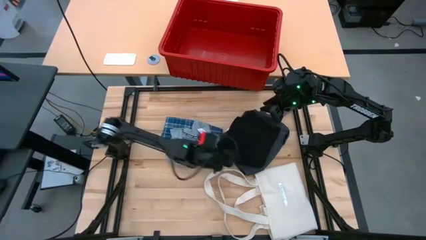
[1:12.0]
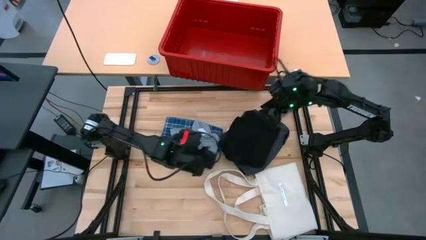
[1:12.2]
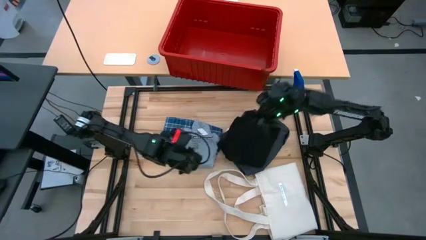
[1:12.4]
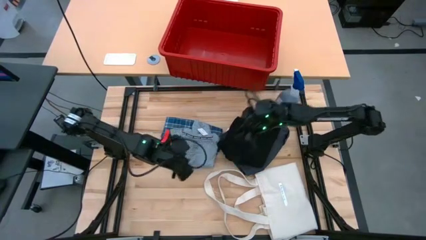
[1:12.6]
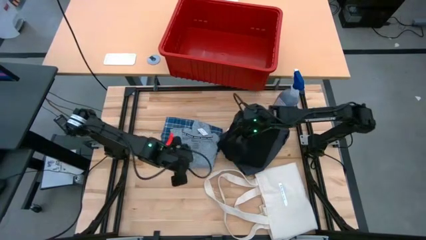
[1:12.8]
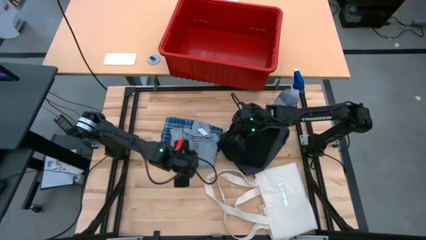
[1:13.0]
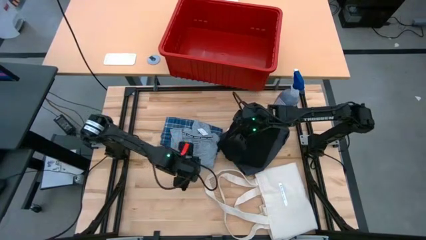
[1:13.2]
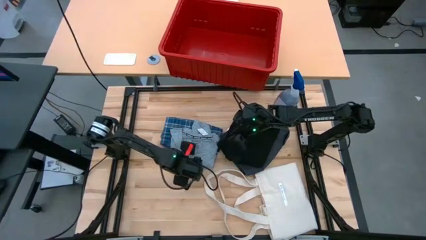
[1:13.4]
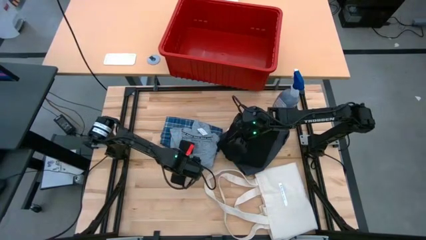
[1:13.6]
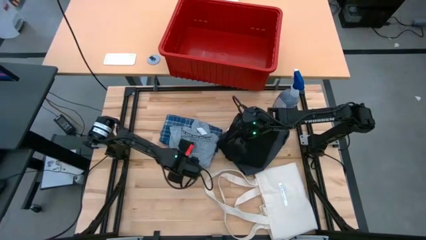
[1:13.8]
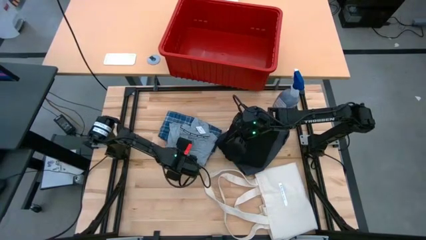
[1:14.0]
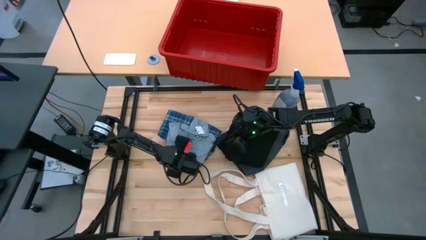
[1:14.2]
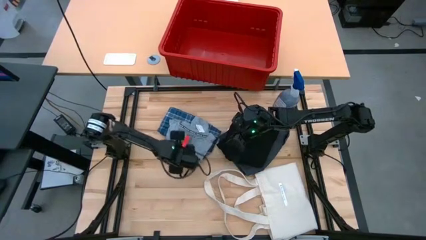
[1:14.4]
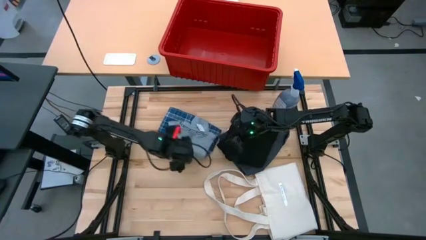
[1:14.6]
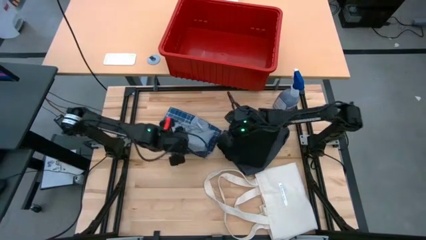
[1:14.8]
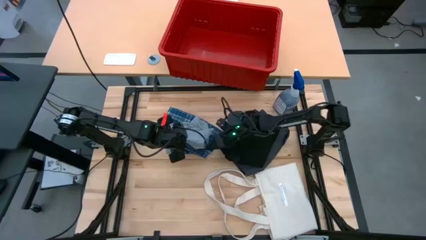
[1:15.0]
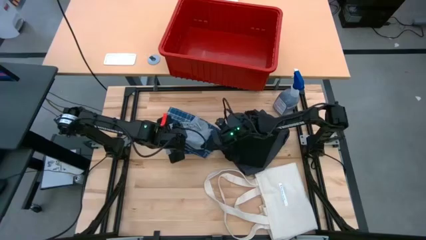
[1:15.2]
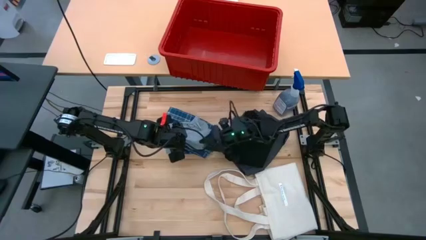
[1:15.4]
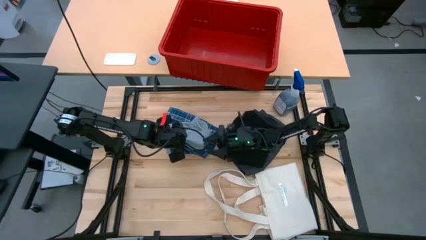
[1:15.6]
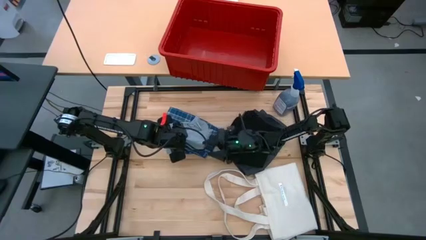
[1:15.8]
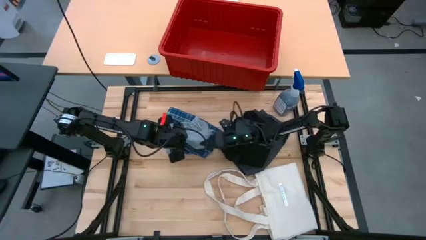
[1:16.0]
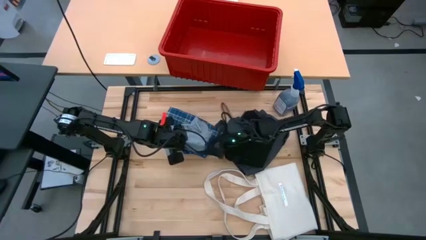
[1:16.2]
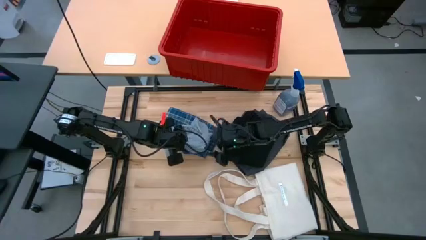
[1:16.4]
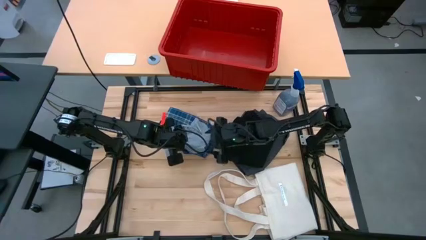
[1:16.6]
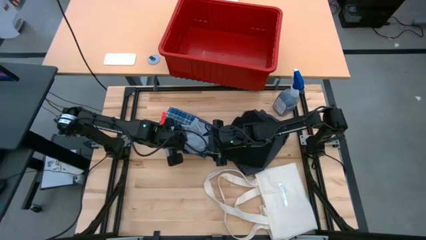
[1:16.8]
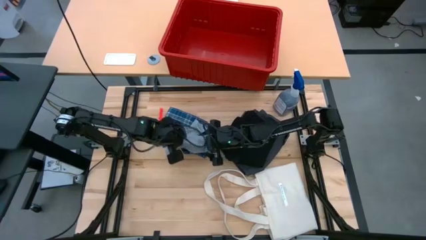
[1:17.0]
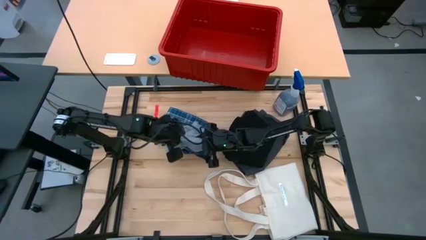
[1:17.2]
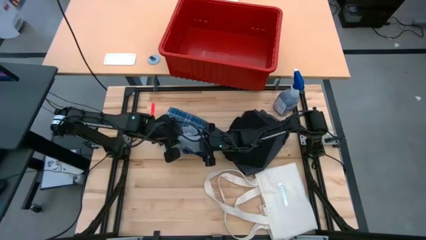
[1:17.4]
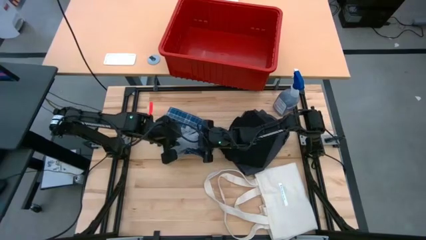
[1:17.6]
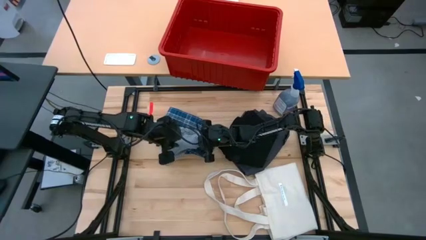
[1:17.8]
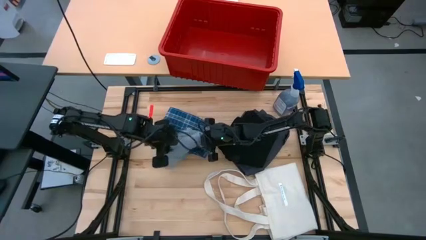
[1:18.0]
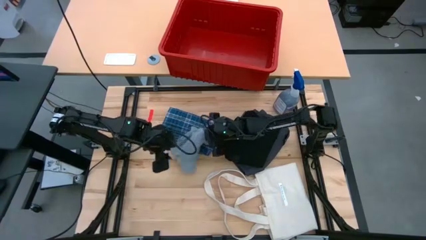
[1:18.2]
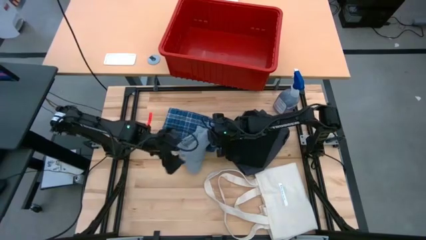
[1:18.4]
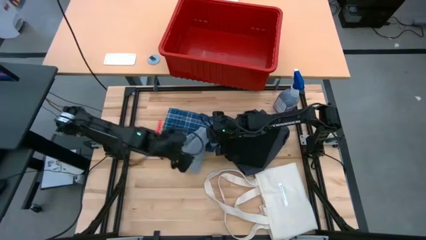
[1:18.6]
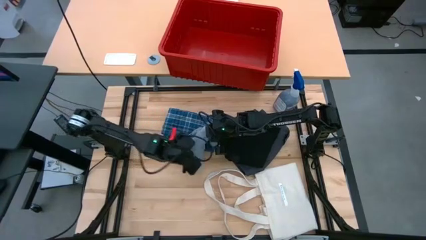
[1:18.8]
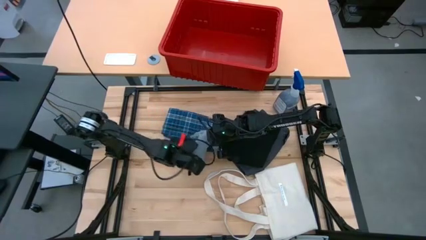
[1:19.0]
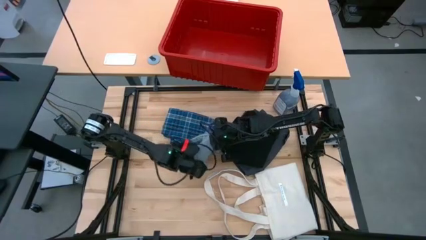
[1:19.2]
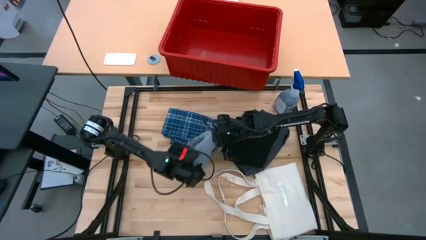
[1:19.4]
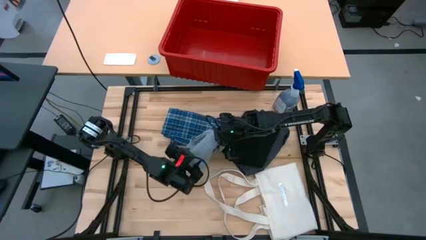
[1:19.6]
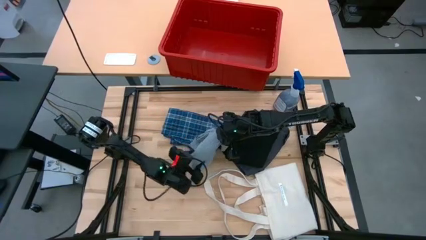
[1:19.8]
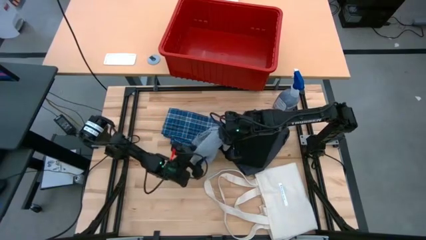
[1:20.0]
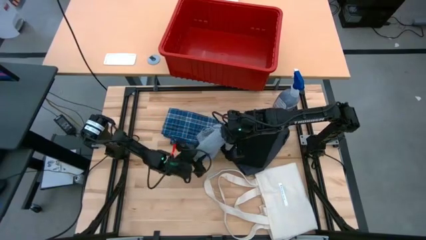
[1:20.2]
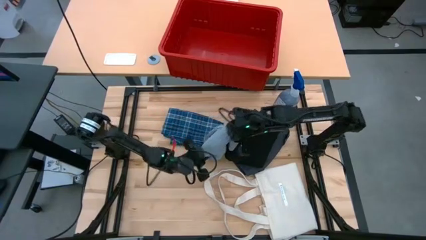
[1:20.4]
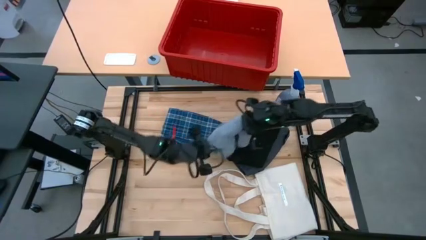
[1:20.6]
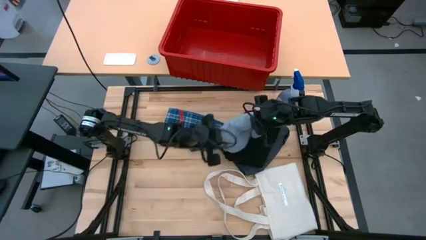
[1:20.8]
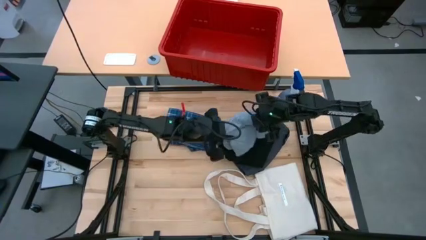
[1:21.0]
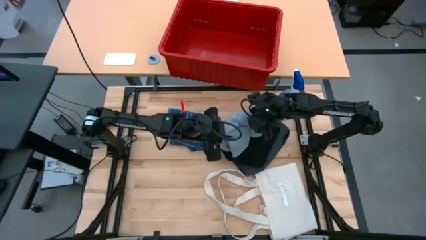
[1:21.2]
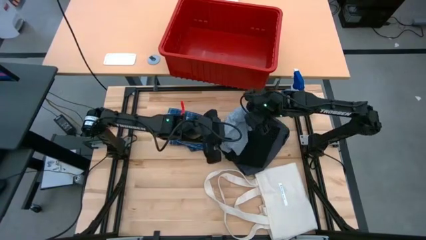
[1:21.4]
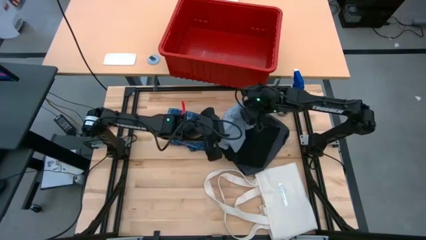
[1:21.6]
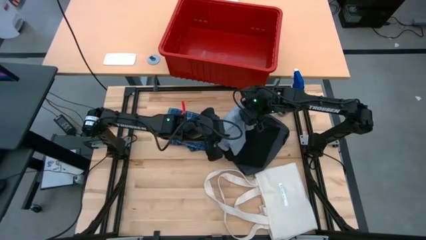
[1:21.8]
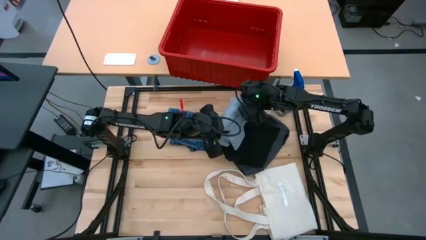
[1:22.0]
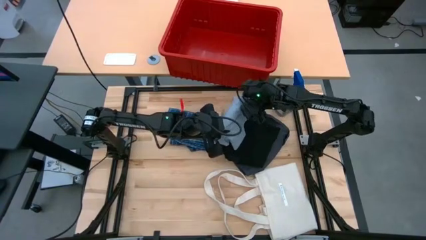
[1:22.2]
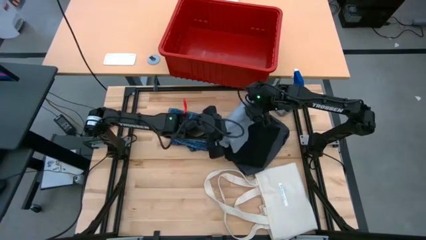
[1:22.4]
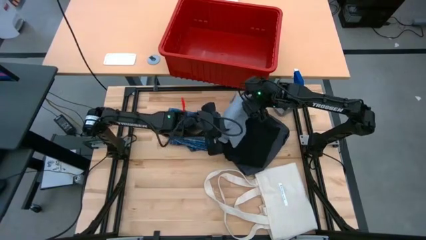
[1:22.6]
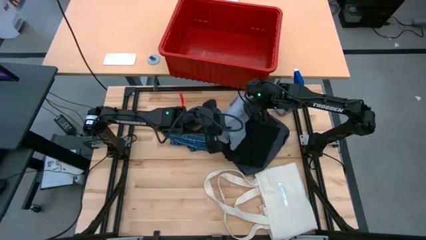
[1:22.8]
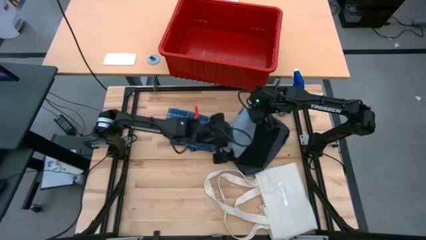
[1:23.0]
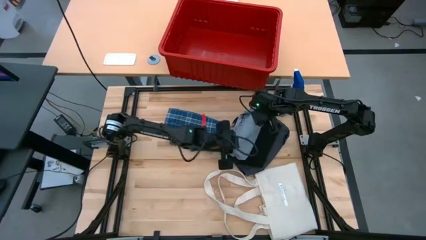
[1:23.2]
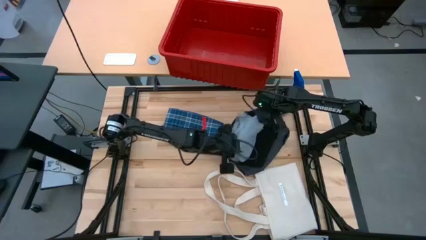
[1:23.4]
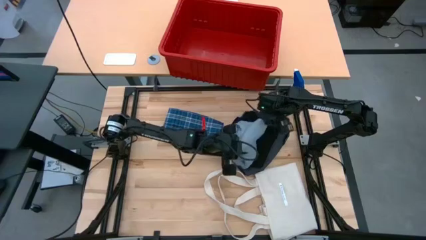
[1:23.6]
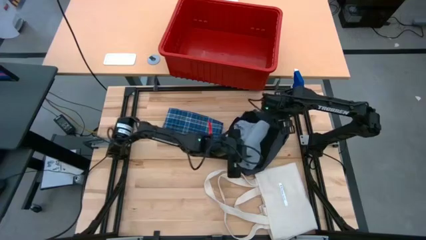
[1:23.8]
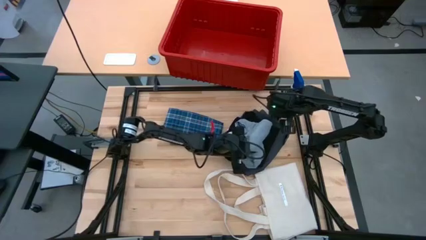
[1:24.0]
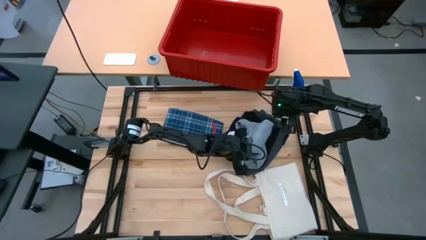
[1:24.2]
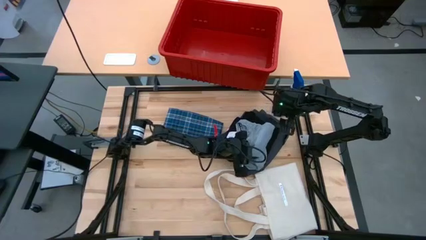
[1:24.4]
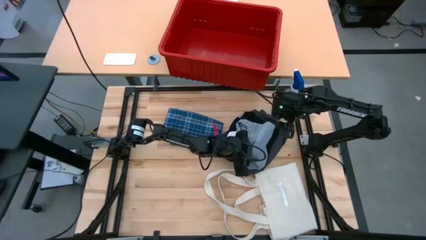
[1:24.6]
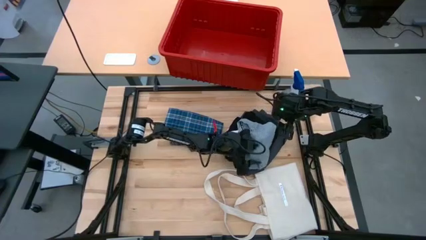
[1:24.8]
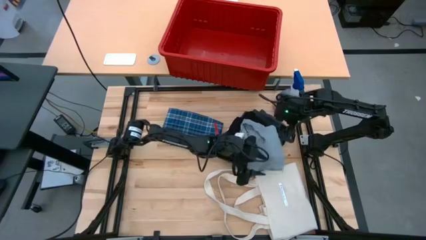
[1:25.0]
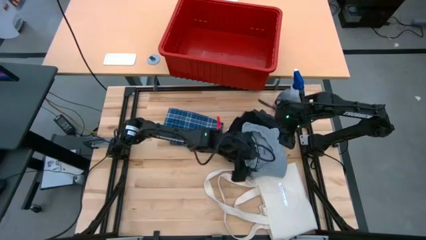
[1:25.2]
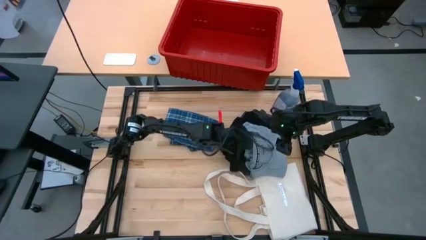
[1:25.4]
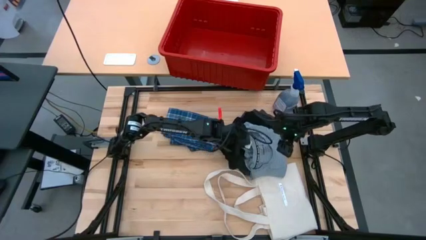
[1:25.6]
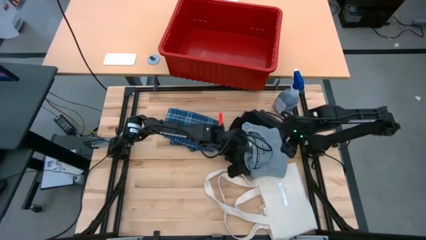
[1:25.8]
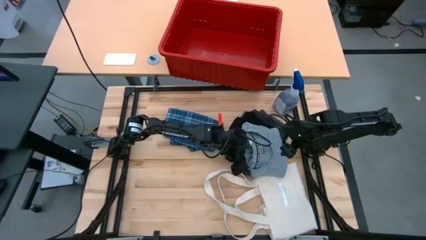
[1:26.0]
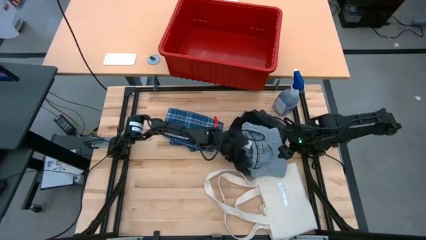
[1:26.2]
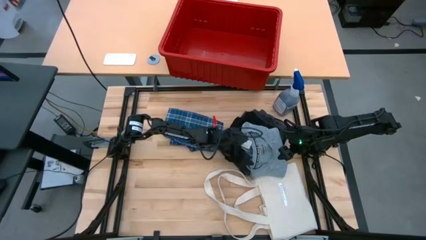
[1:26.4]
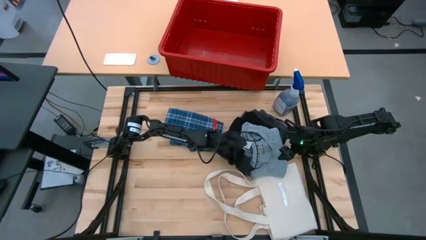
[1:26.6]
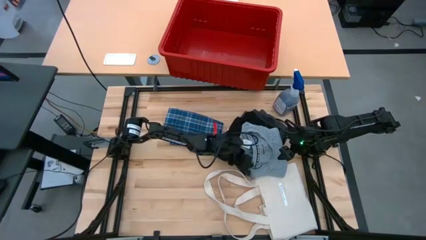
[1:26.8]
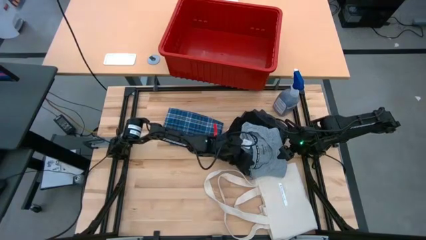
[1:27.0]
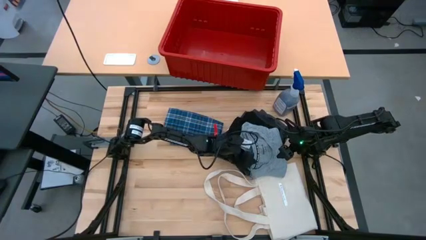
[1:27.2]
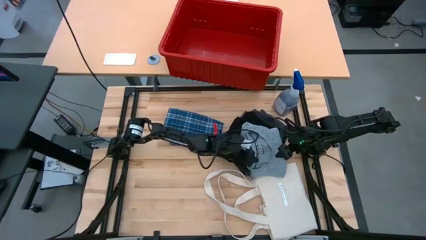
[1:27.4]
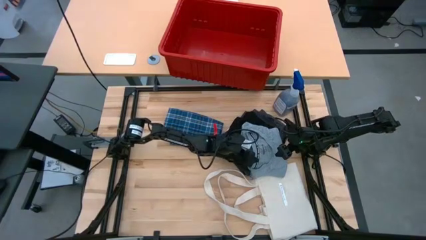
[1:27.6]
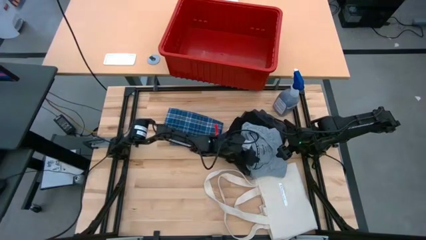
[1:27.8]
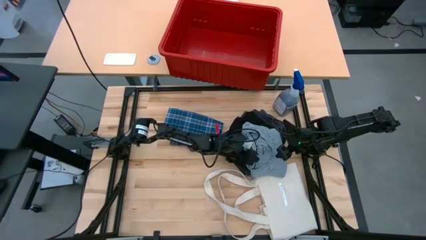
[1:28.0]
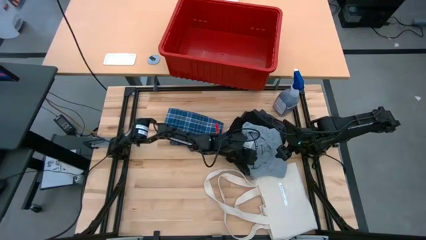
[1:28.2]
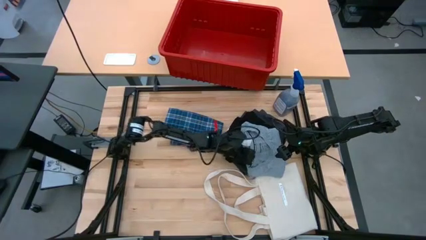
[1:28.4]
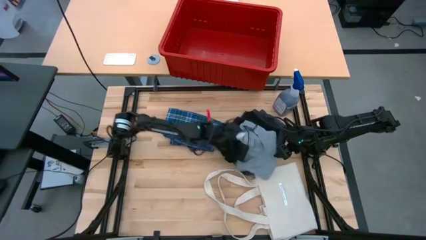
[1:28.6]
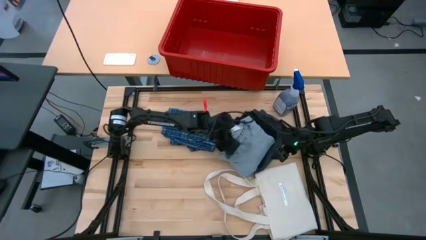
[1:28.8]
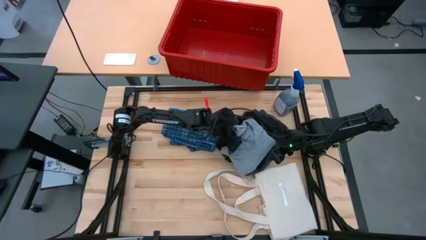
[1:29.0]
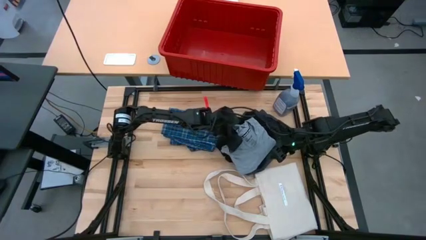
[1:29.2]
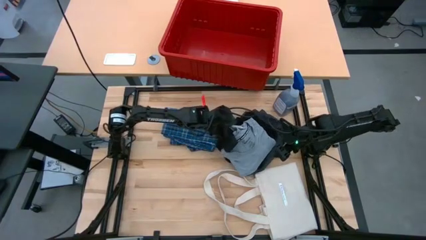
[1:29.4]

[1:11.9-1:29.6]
Task: Fold laundry
Stack the gray shirt on top of the black shirt
